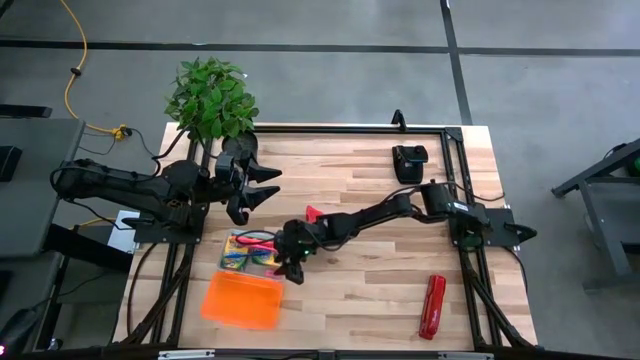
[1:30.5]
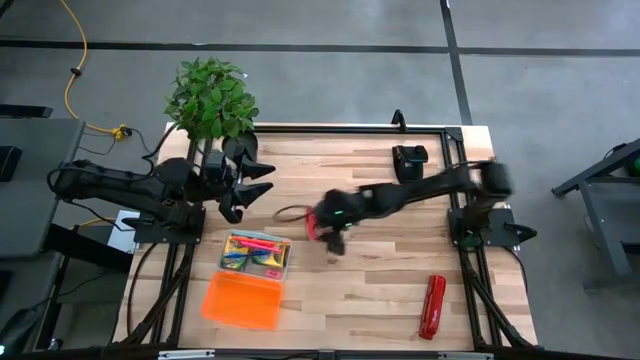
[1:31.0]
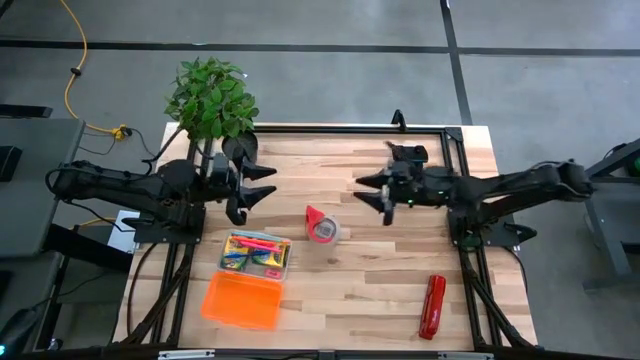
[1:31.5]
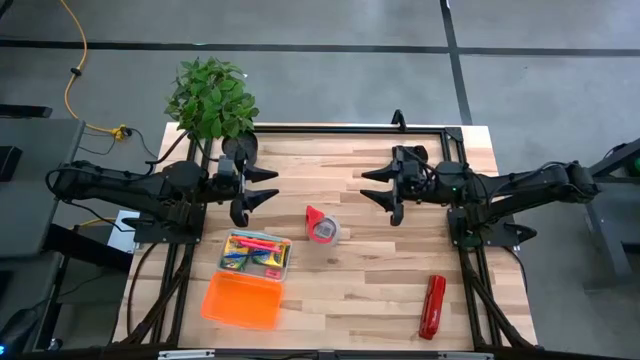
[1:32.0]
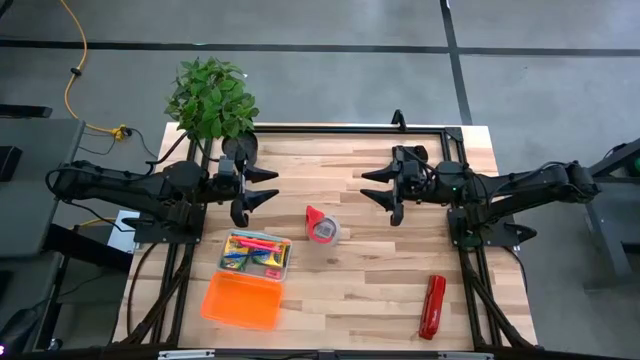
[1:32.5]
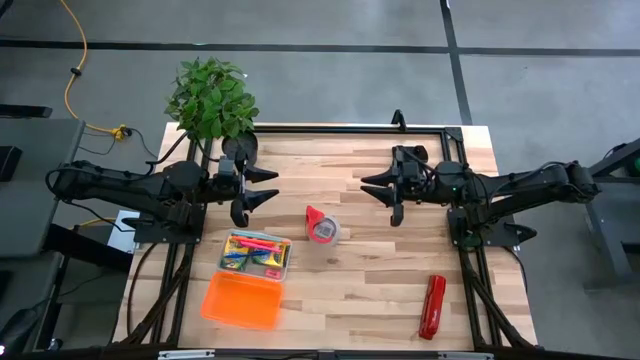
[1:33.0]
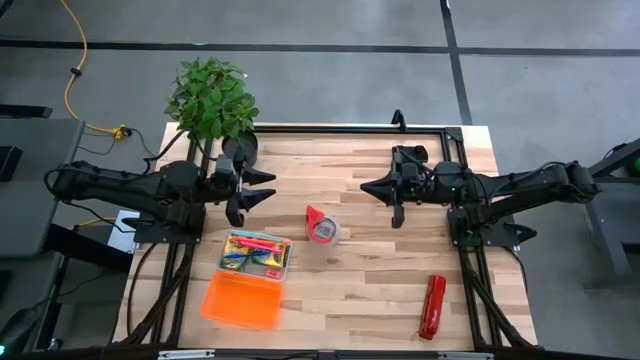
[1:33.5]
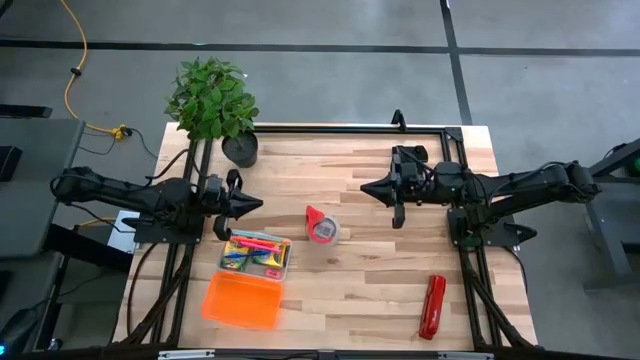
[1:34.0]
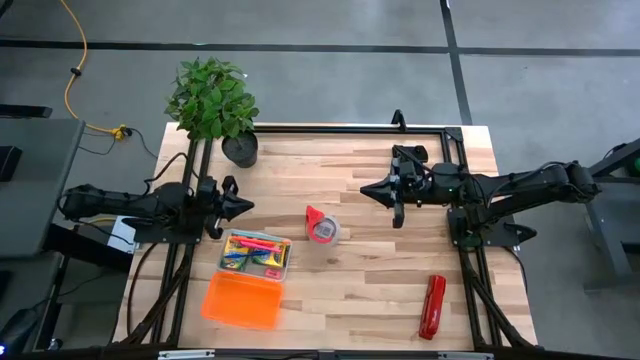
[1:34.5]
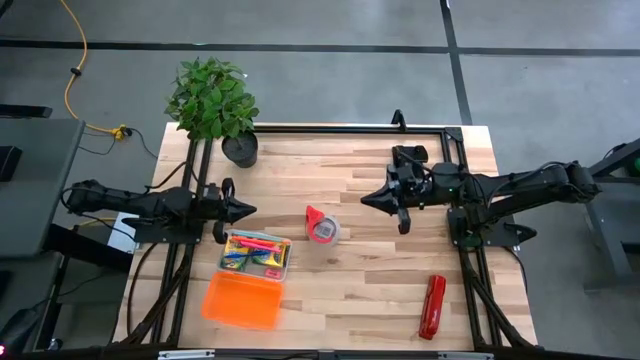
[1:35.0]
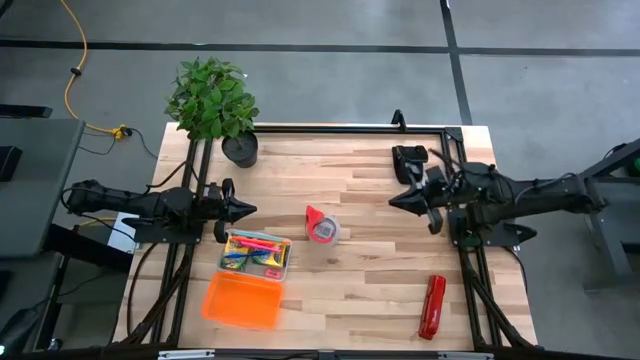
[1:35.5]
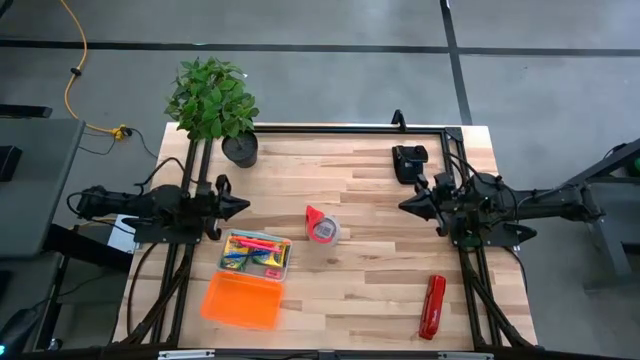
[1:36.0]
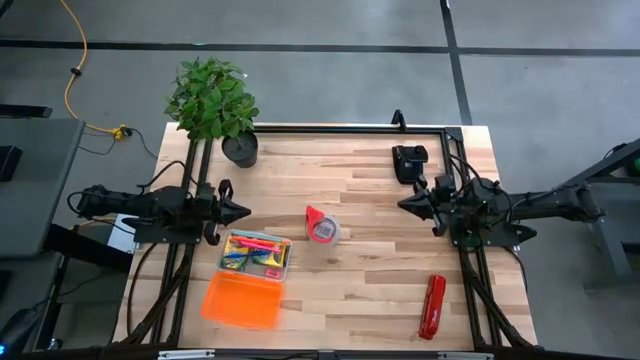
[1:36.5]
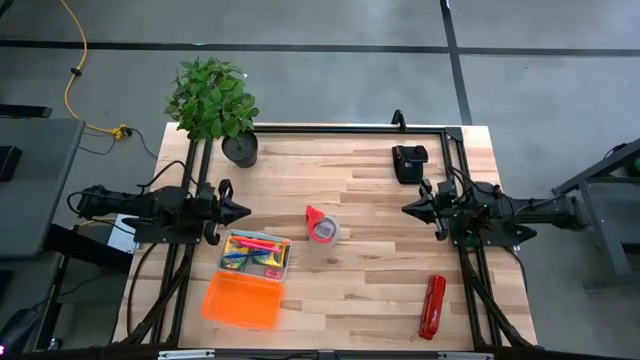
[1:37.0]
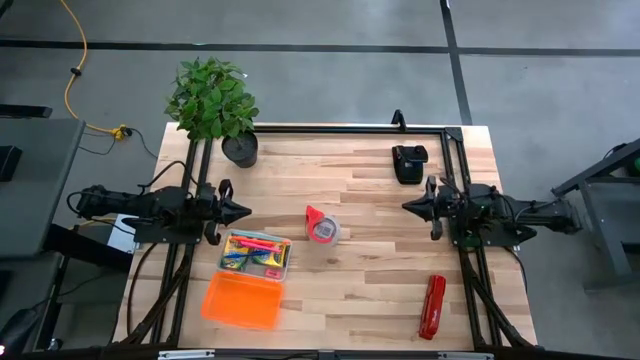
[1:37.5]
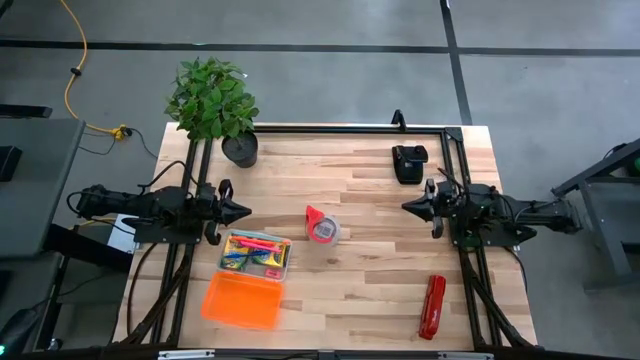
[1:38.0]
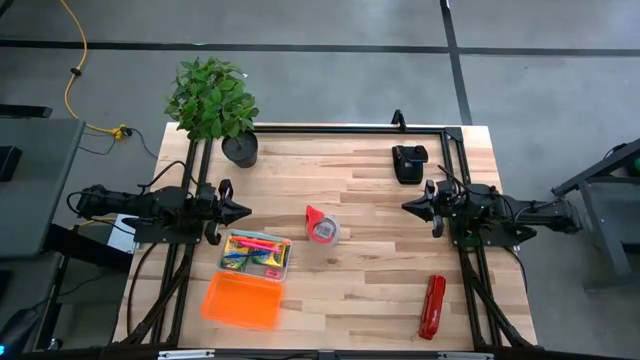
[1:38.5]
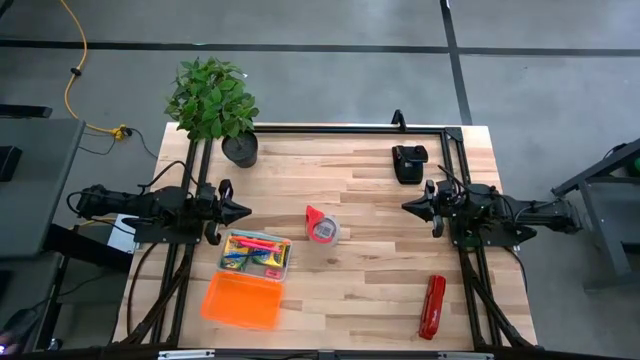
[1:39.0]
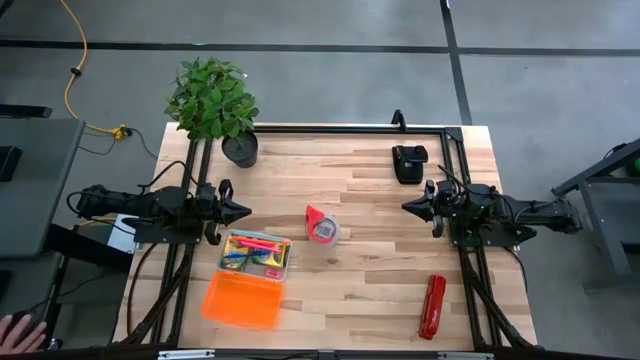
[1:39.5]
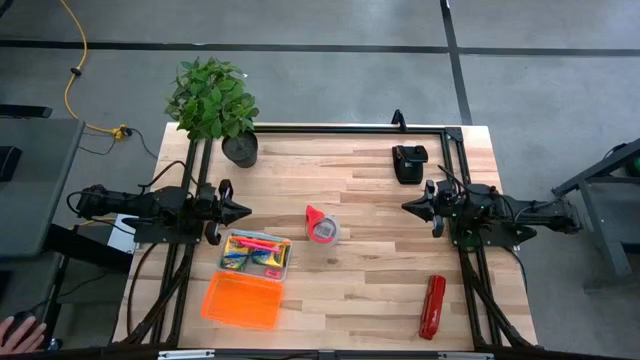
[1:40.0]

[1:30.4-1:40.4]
Task: Pack school essentials
Return to Home Position

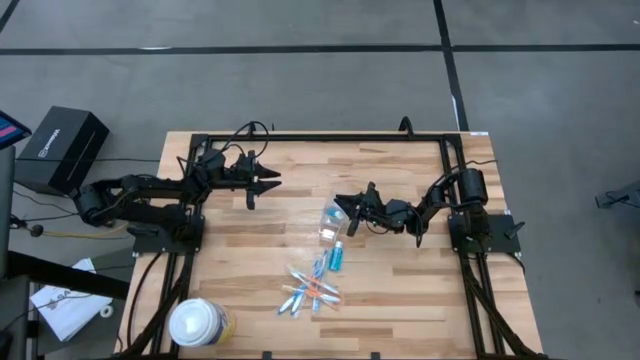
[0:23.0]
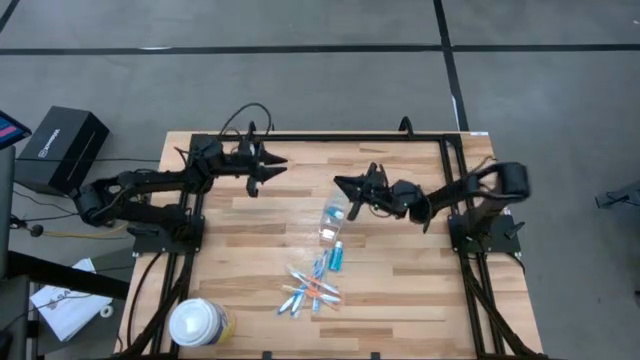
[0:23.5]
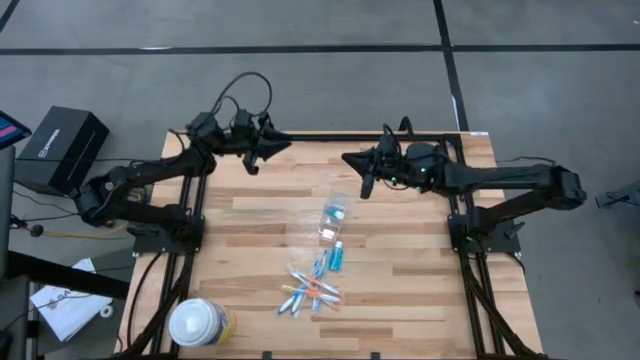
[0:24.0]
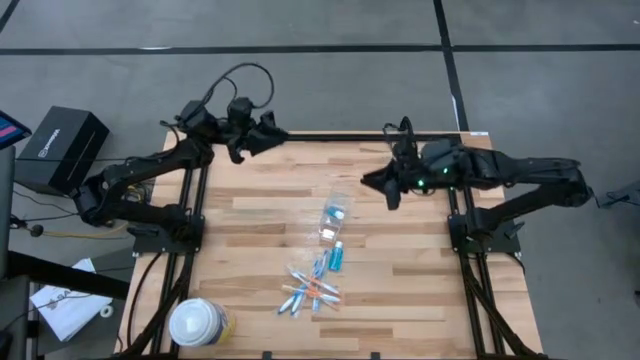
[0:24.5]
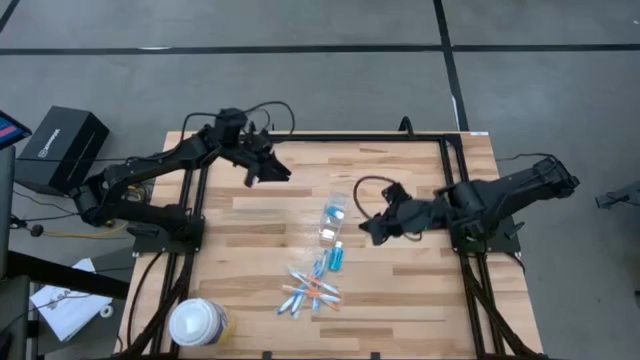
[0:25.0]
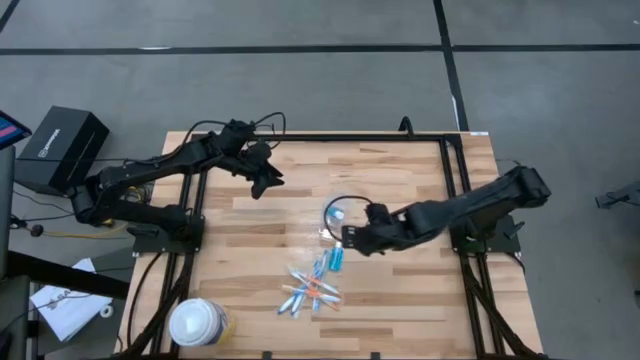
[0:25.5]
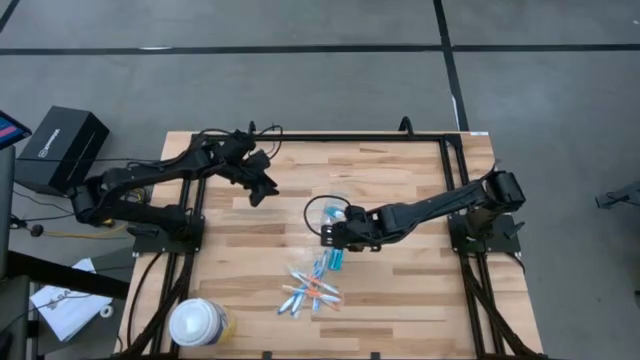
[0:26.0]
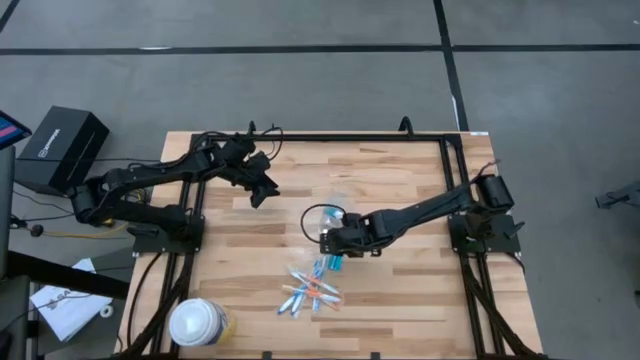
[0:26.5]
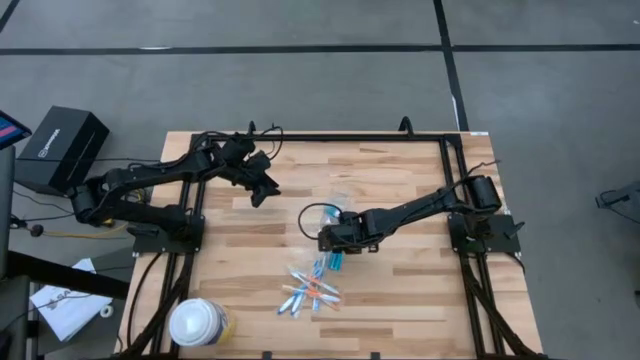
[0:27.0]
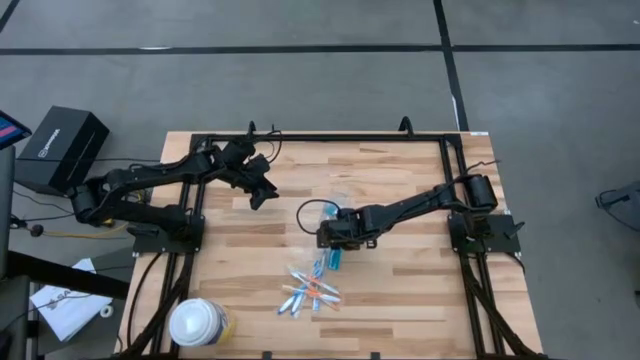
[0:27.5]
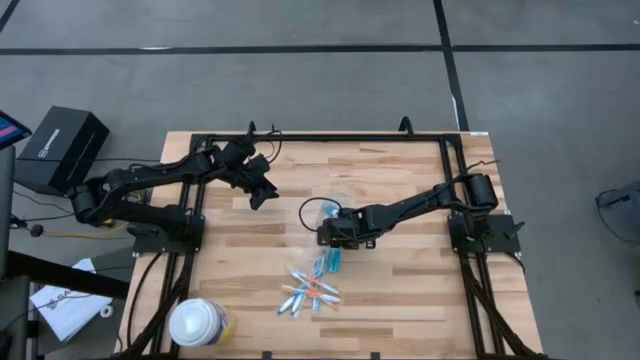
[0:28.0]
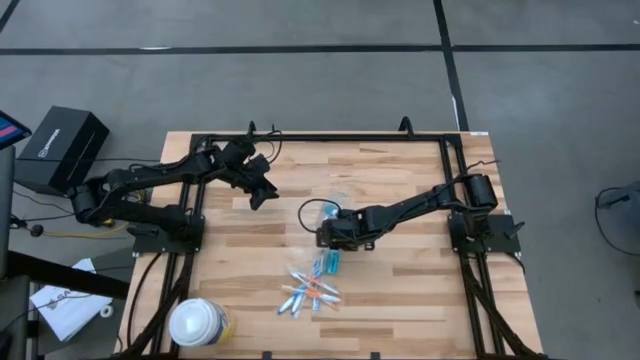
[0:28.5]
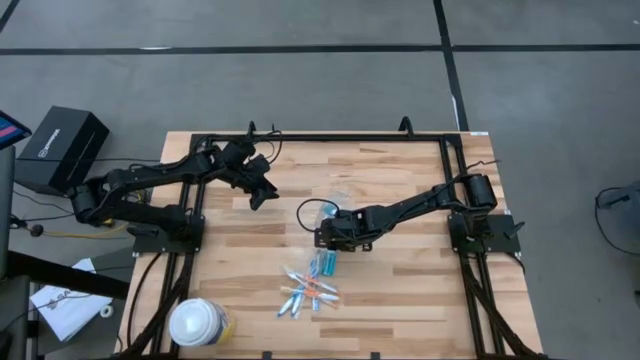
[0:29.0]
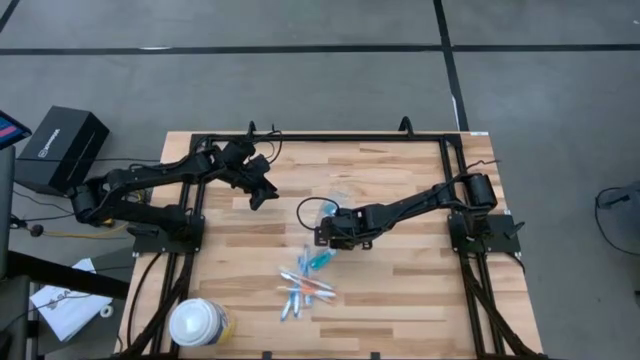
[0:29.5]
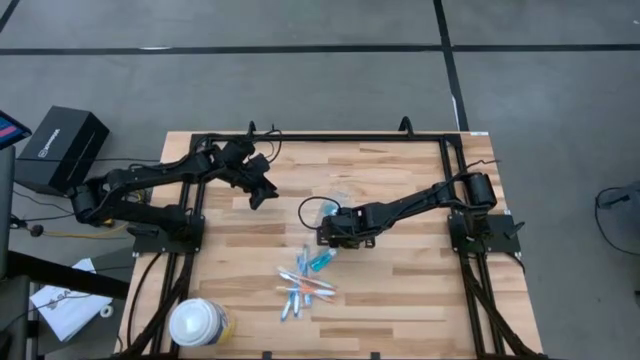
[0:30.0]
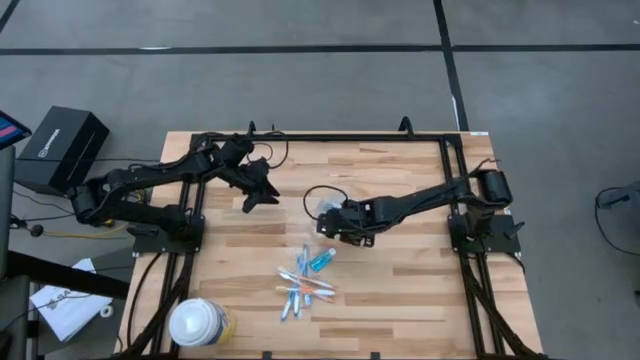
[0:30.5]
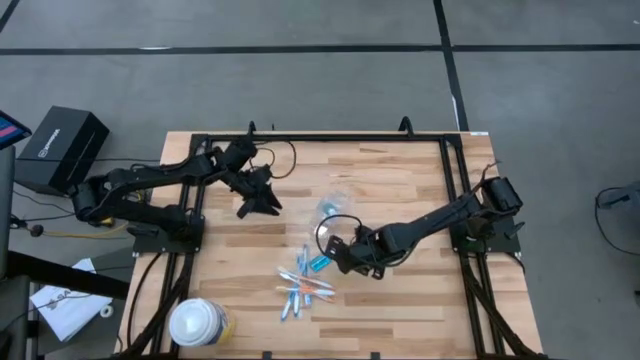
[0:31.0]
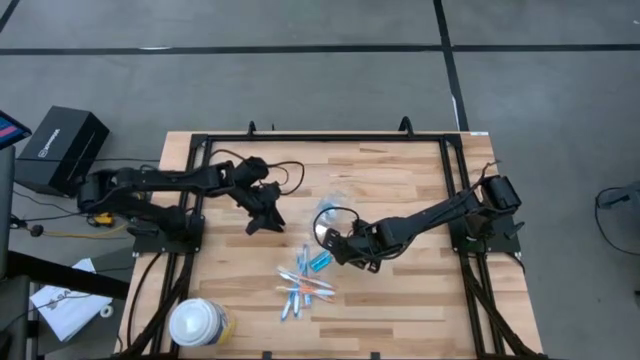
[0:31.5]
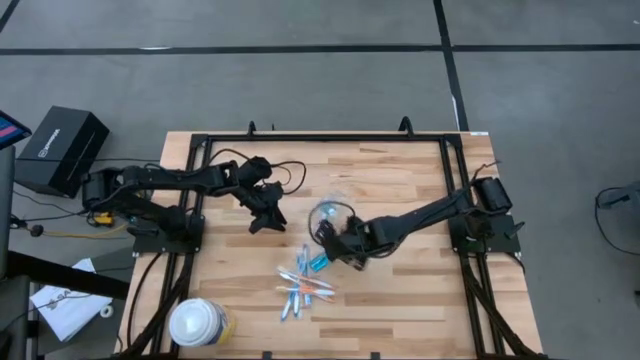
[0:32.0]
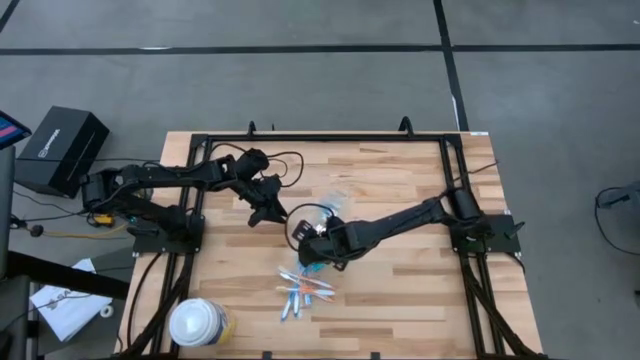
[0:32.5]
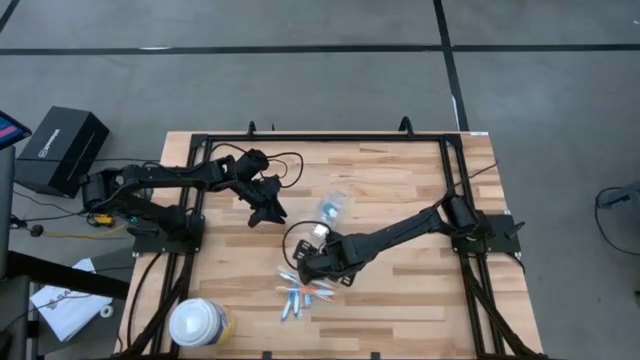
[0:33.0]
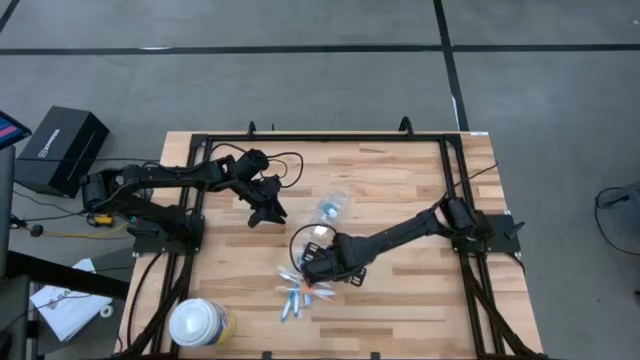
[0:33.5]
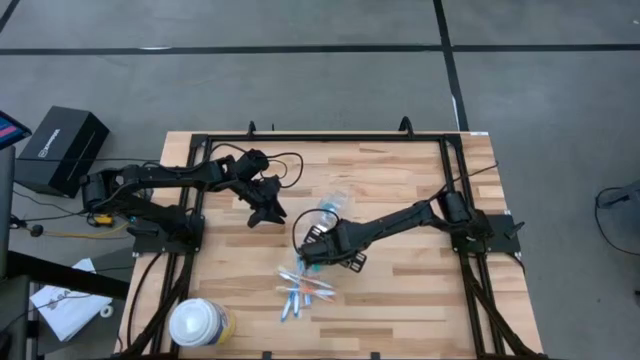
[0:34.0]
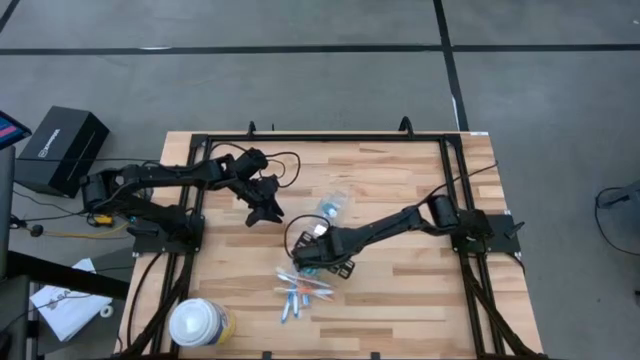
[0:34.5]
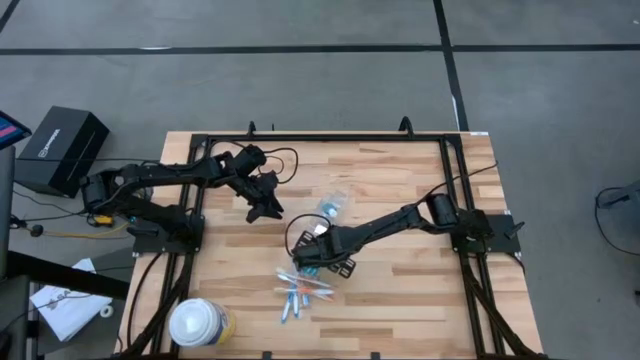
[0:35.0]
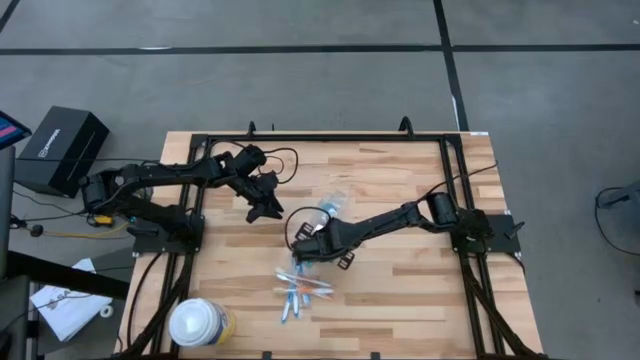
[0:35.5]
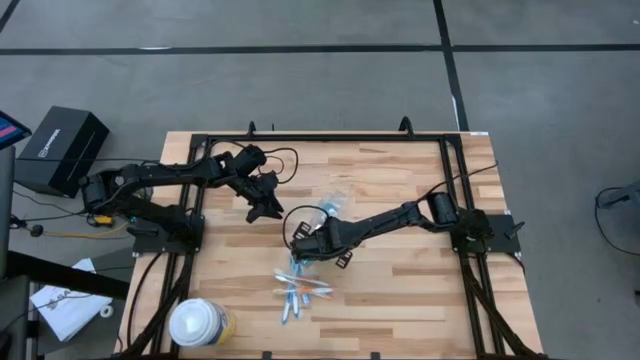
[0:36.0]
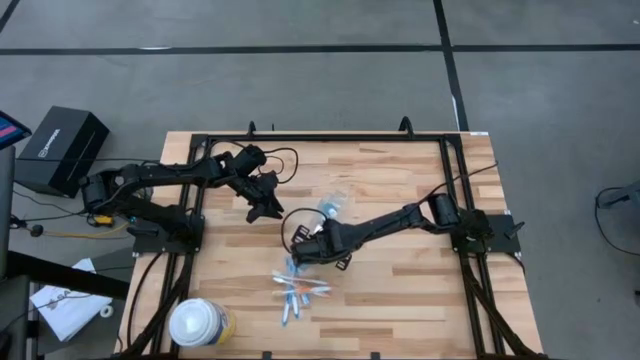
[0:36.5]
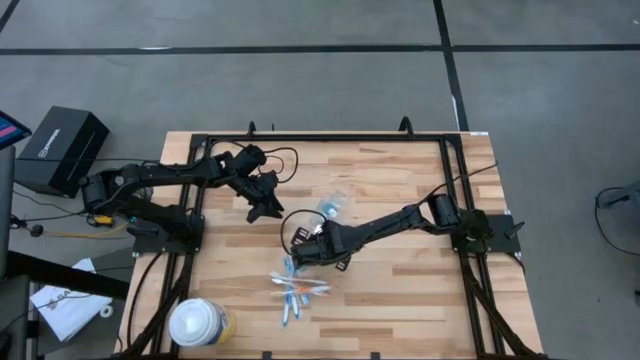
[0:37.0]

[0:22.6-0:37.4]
Task: Pick & Place toothbrushing station
Put the mouthwash into the middle section of the transparent organizer
